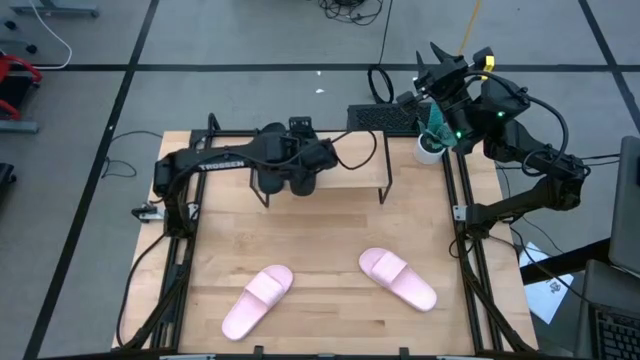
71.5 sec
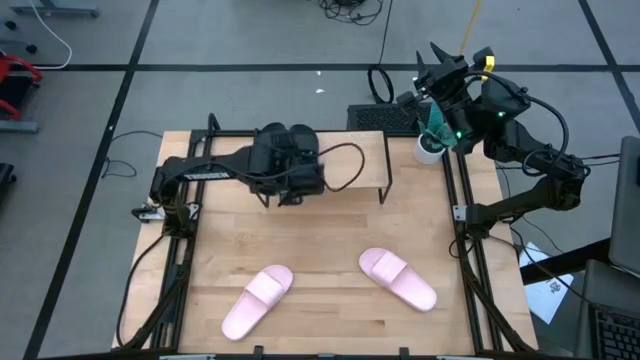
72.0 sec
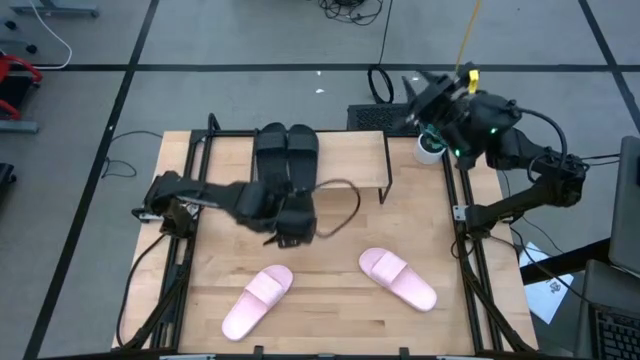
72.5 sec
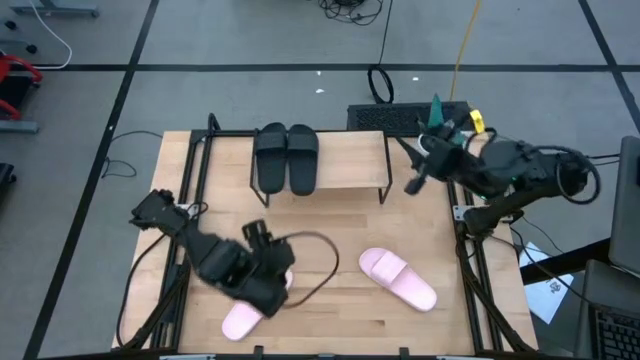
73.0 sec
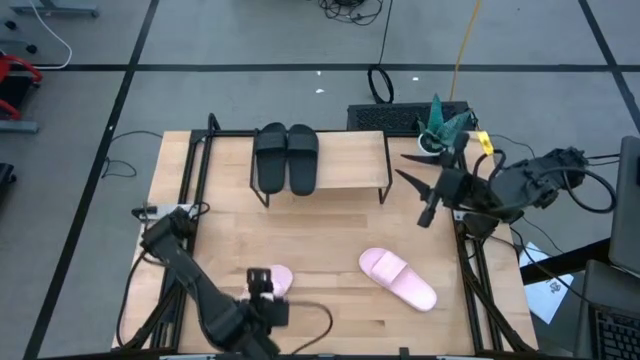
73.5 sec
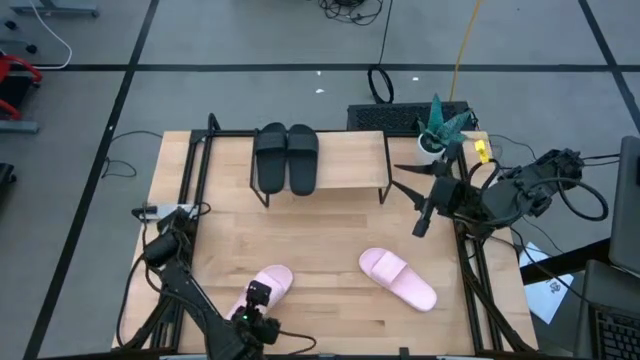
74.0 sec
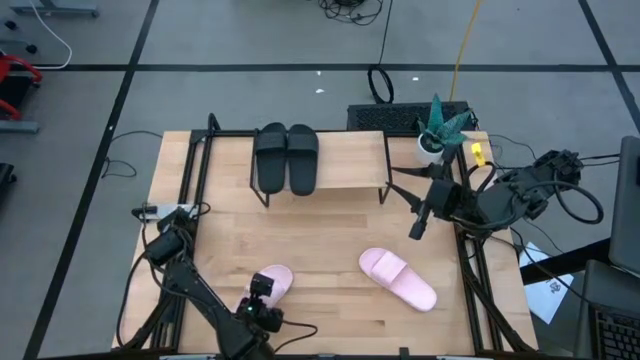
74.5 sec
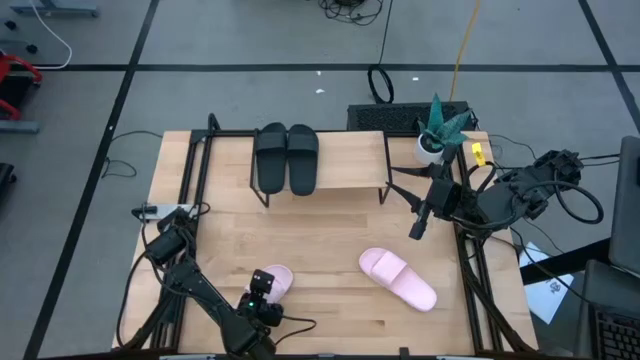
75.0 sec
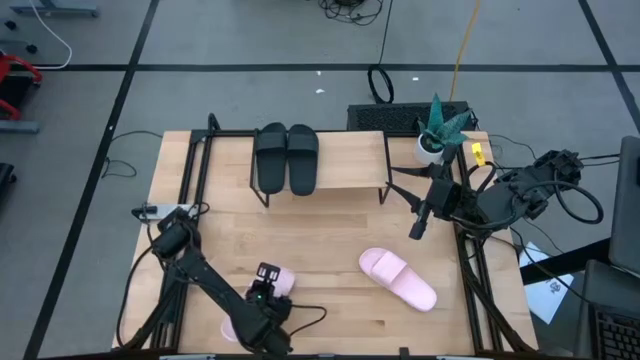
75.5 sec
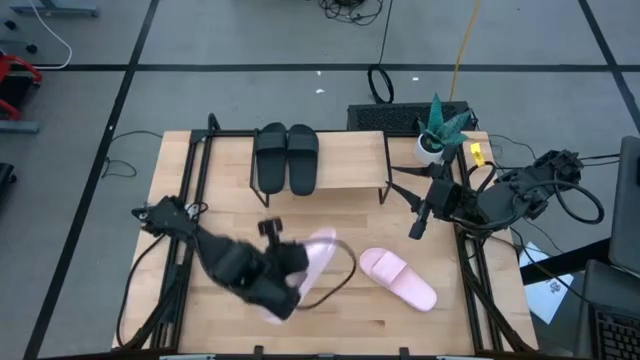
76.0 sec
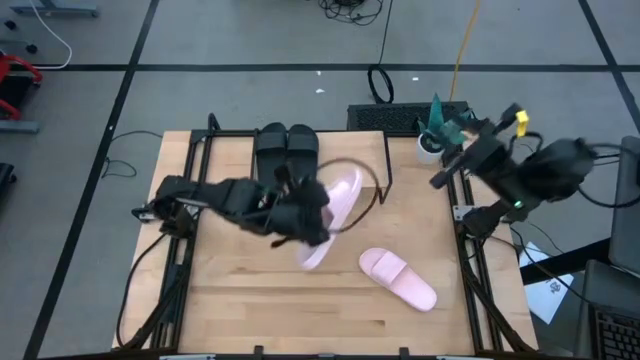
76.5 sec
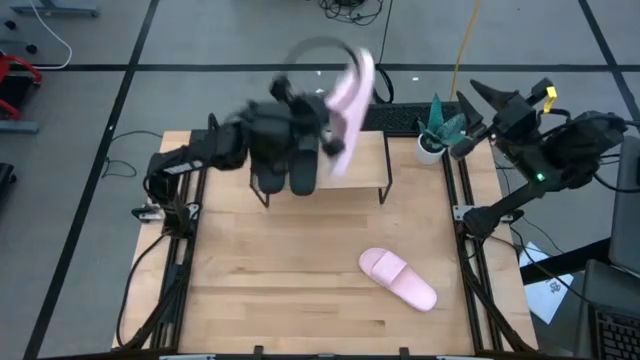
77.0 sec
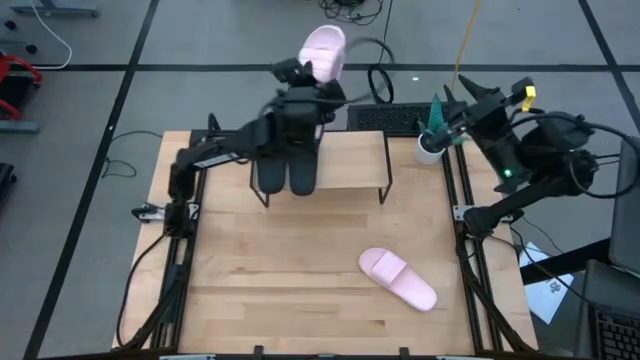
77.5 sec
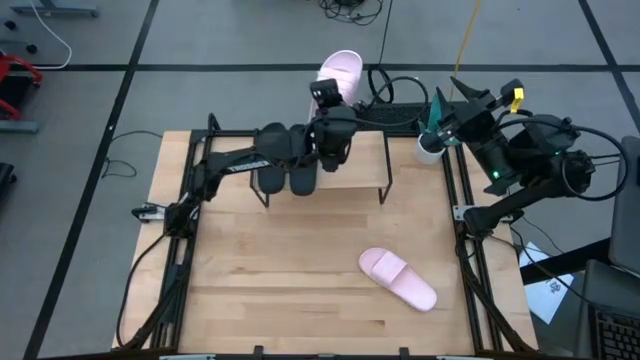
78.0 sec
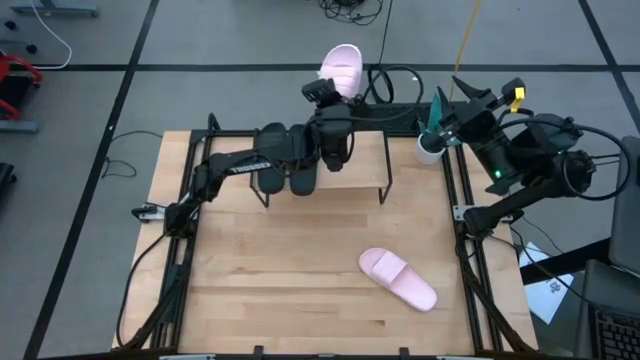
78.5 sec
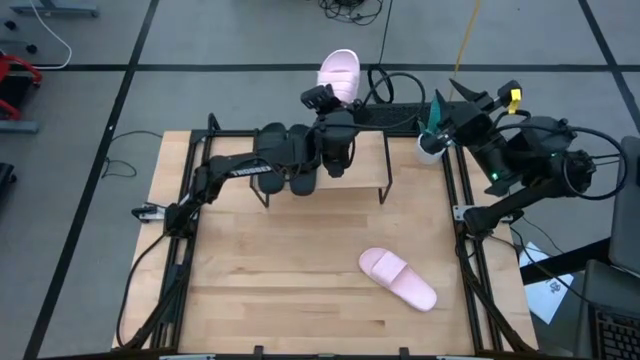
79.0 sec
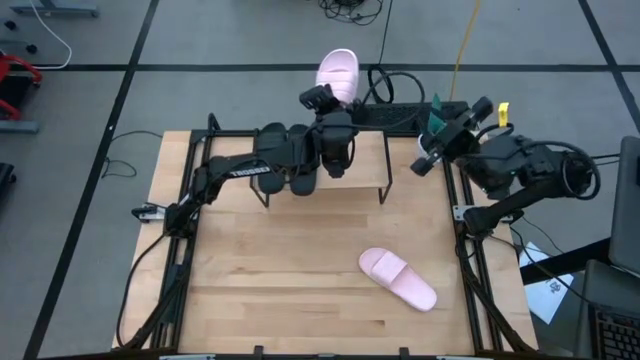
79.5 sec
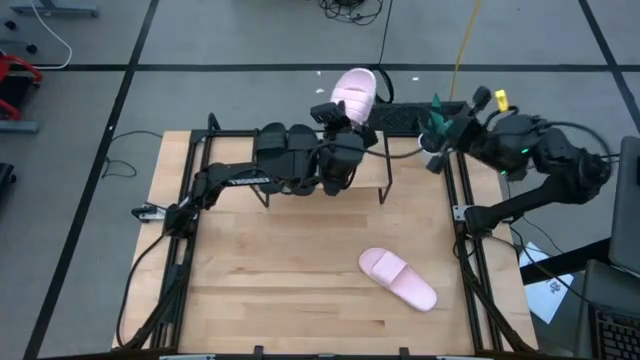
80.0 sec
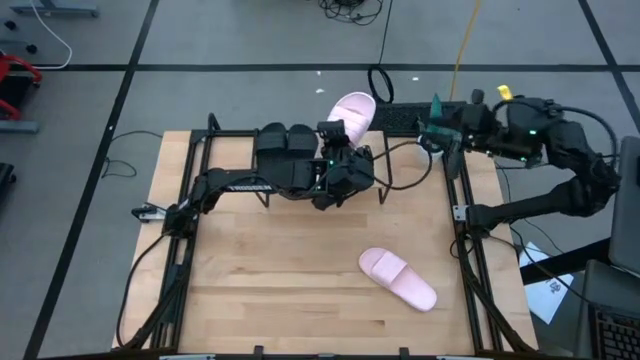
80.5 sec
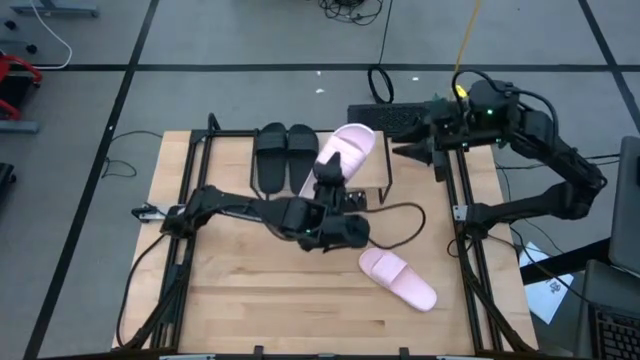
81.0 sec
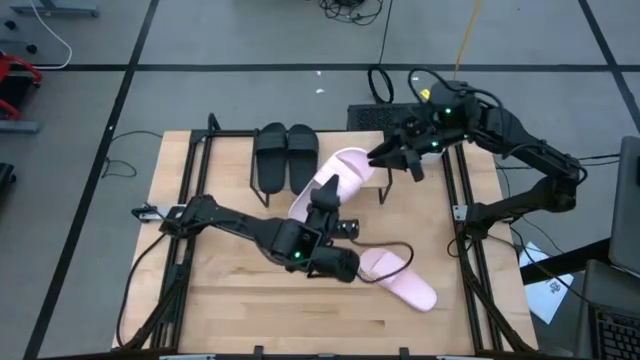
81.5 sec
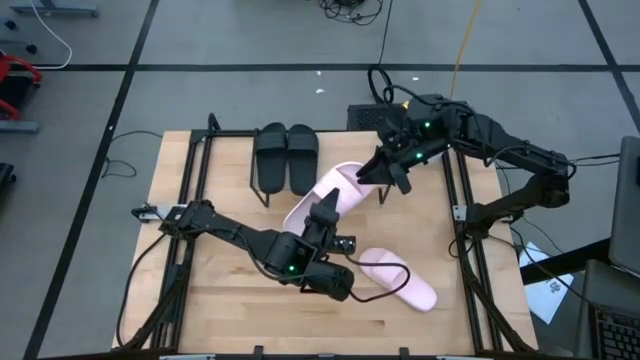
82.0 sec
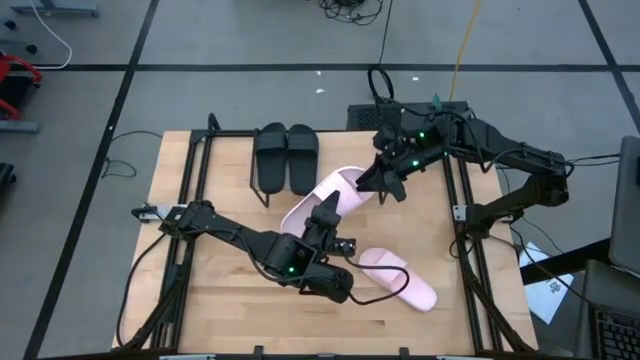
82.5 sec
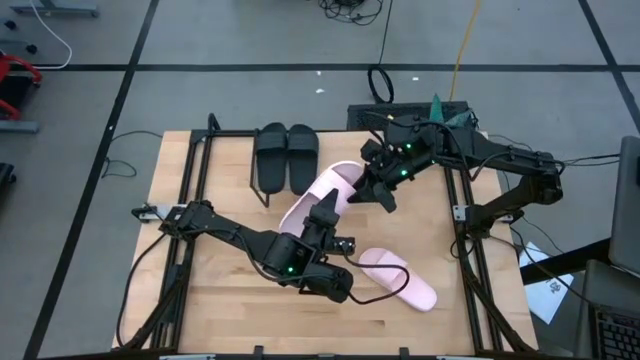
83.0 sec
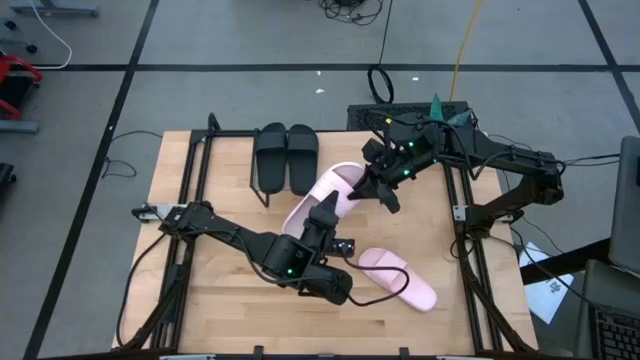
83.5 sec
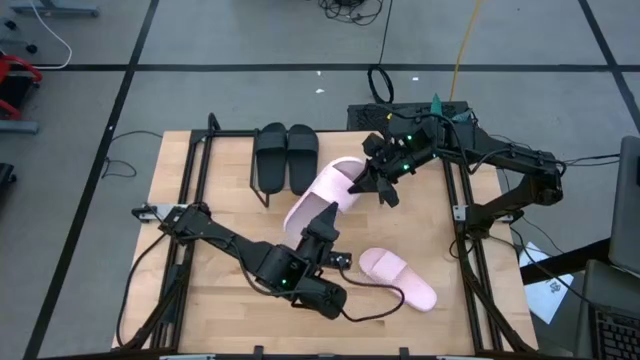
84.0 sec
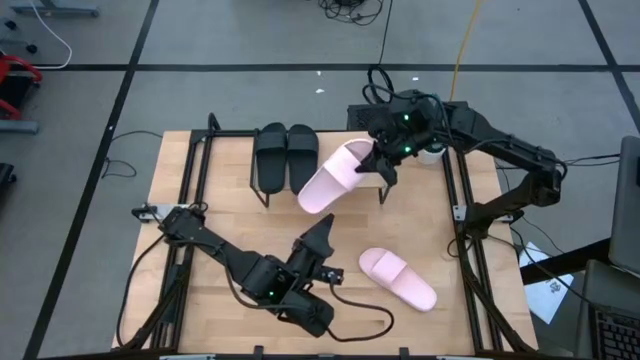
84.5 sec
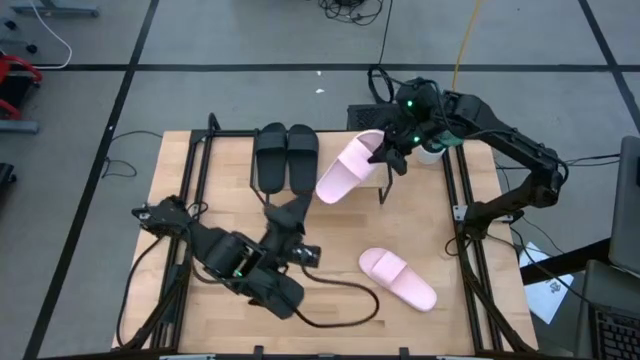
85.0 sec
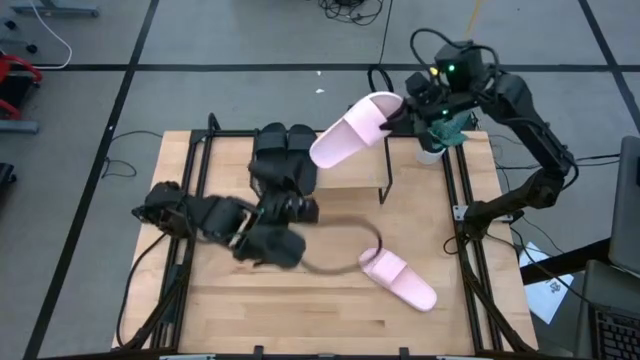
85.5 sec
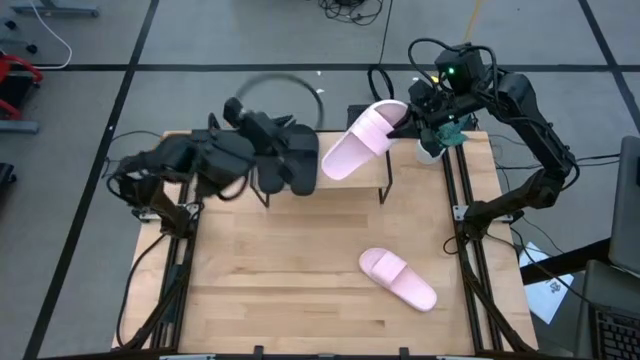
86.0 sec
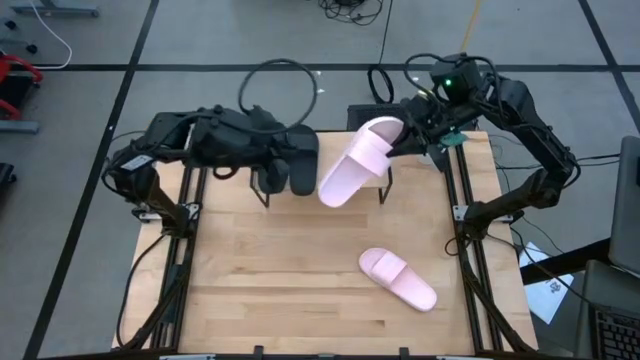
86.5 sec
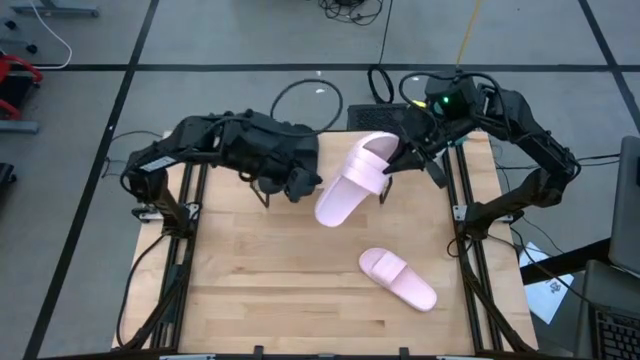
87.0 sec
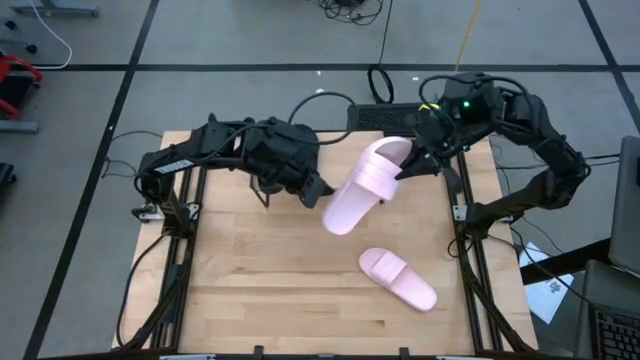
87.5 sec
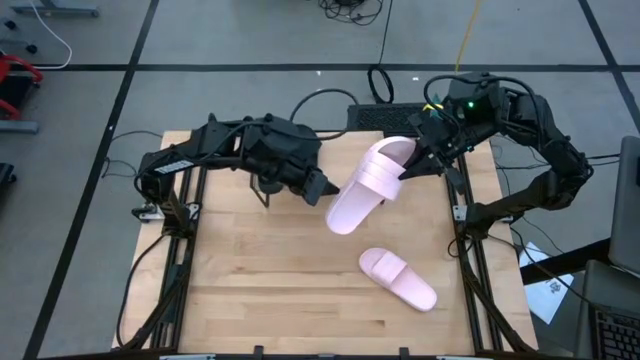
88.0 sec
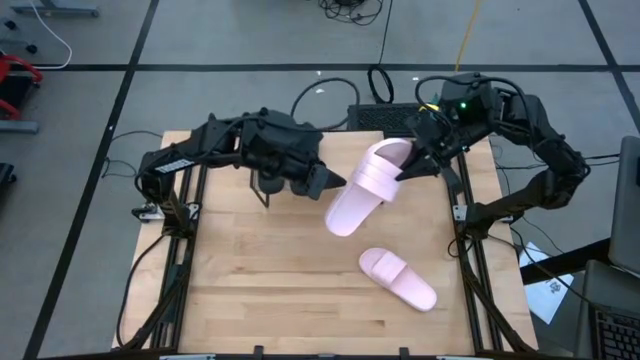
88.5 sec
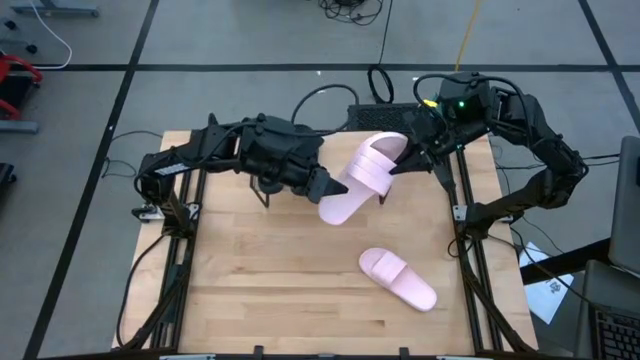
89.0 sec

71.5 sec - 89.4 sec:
Task: Pick and place slides into the shelf
Put the left pink slipper on the shelf

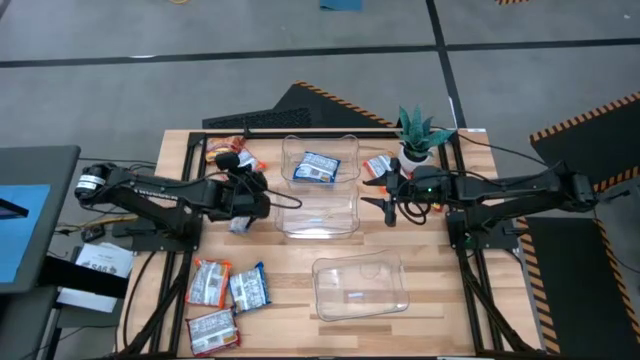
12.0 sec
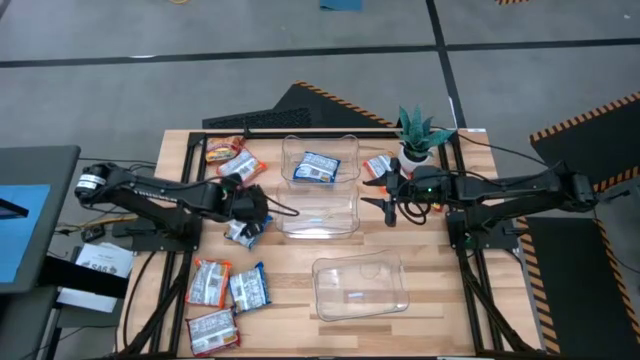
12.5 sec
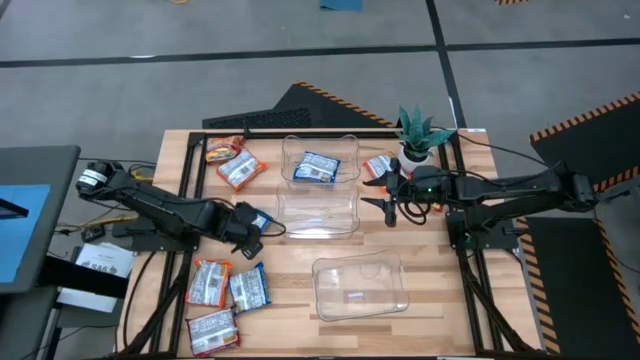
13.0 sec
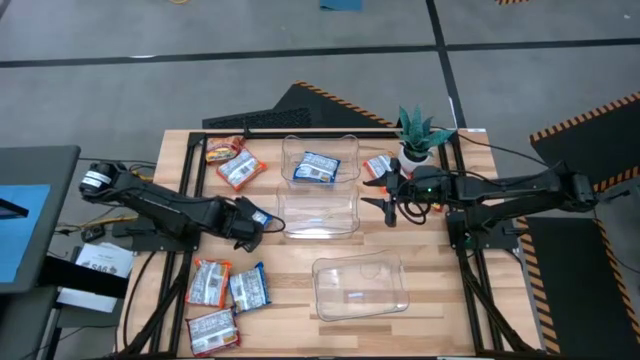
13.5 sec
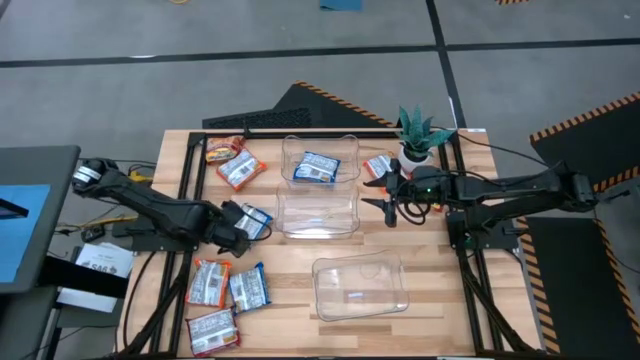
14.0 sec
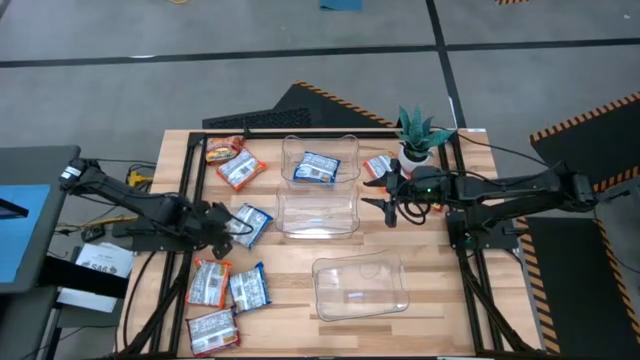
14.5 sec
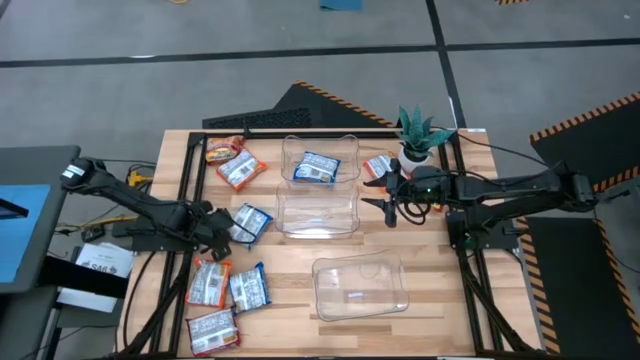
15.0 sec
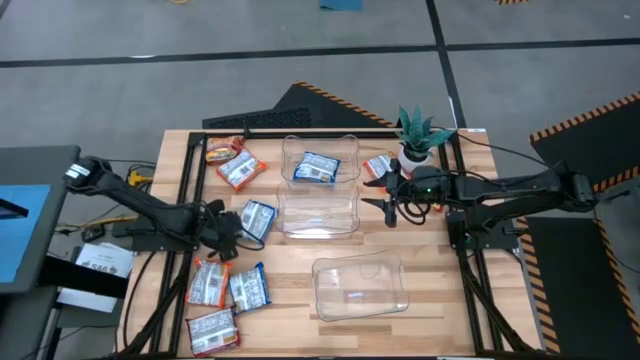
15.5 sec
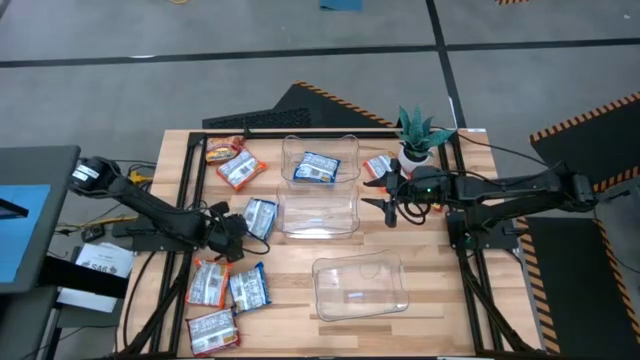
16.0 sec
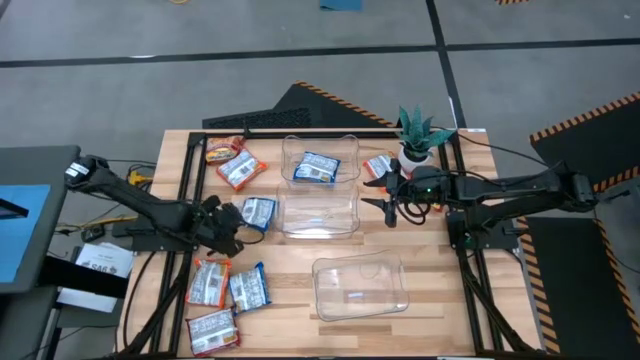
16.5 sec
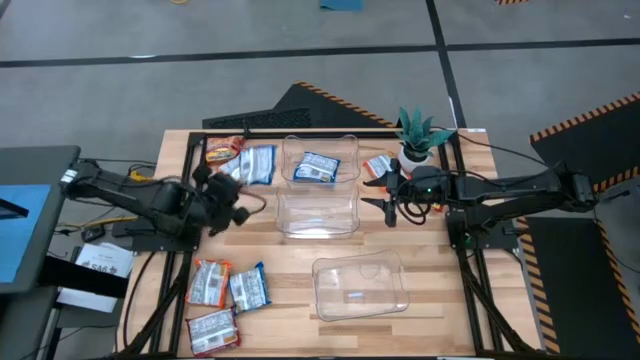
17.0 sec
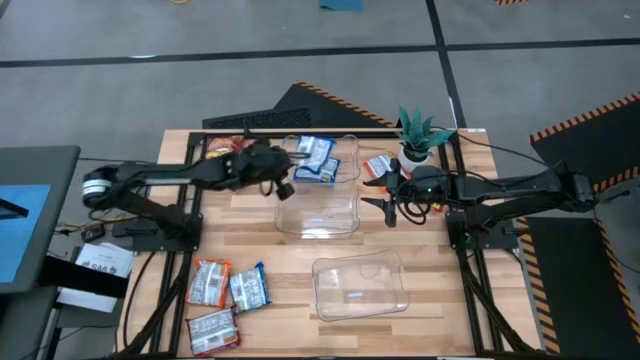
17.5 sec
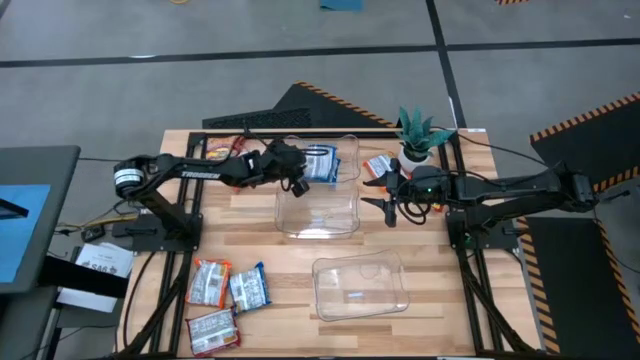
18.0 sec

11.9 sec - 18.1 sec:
Task: Sort Maruchan noodles
Put the top blue noodle pack into the top transparent bin
